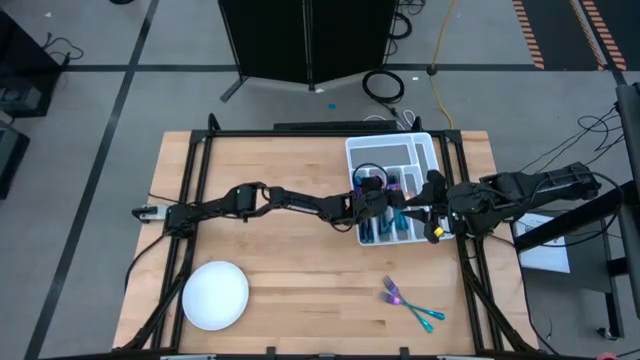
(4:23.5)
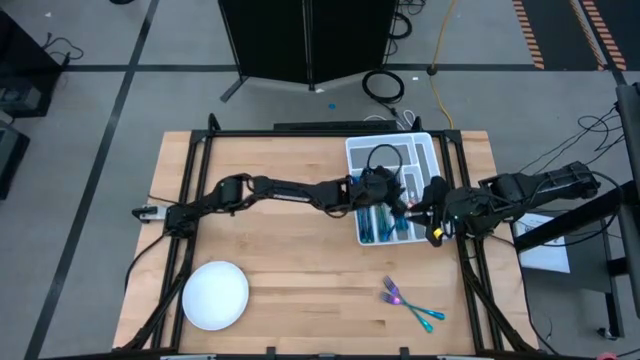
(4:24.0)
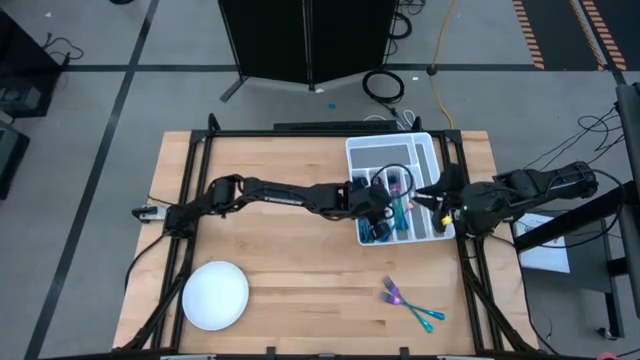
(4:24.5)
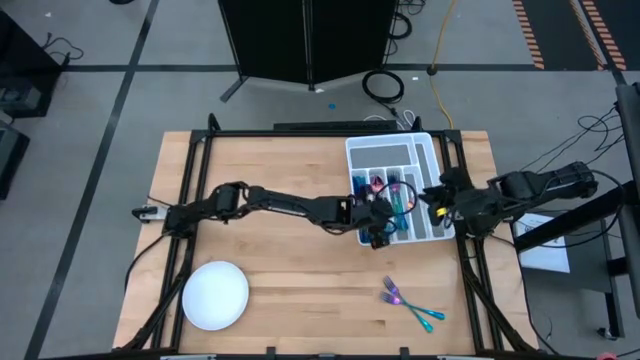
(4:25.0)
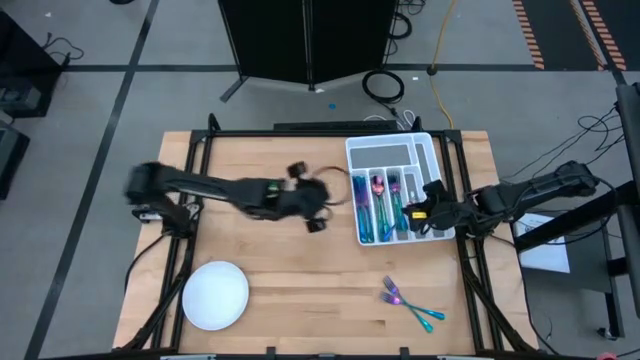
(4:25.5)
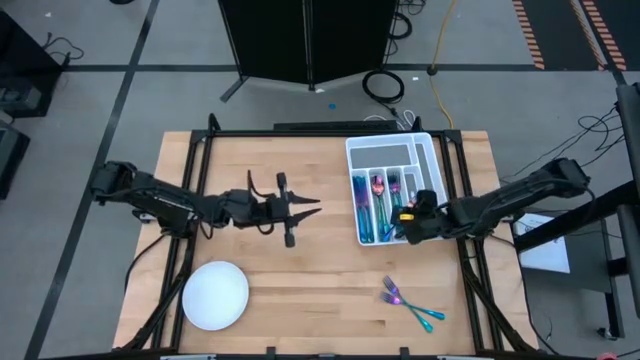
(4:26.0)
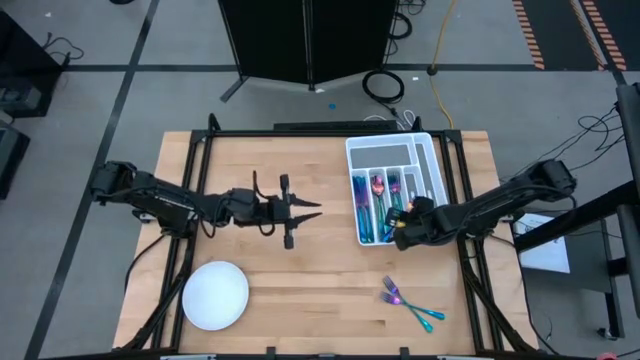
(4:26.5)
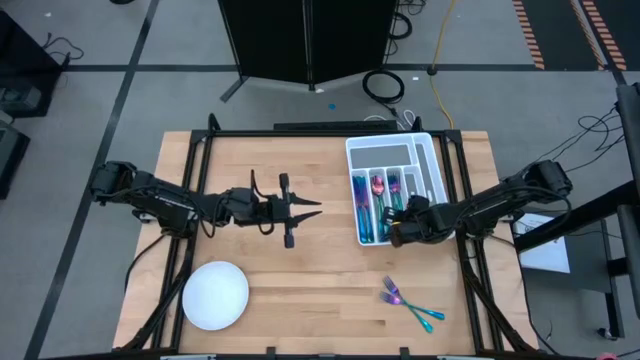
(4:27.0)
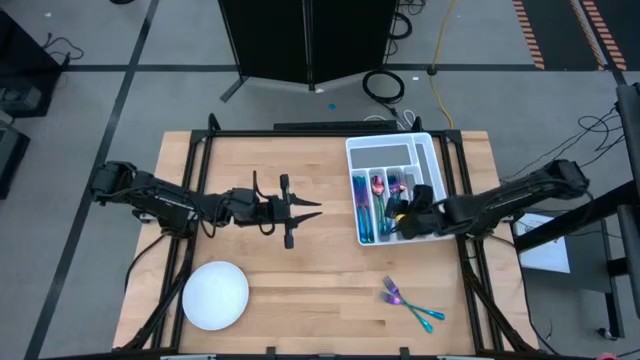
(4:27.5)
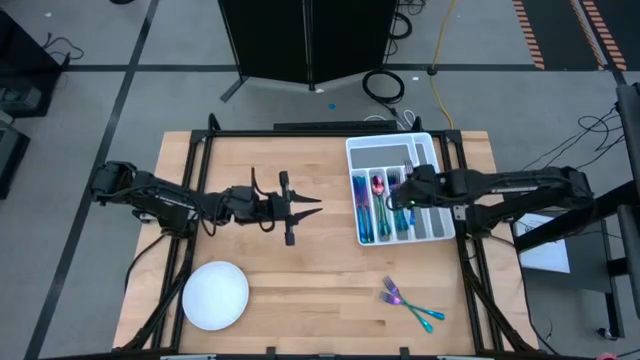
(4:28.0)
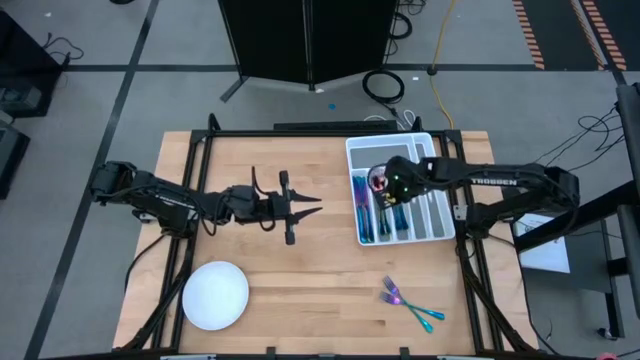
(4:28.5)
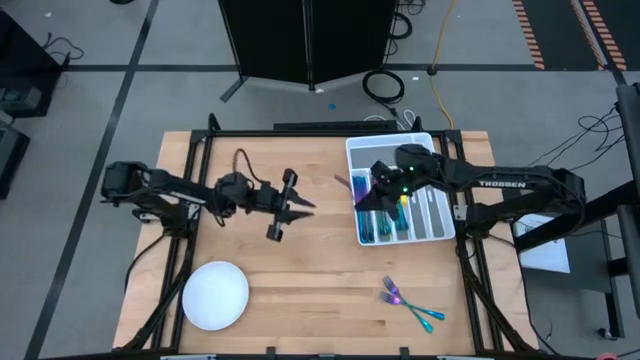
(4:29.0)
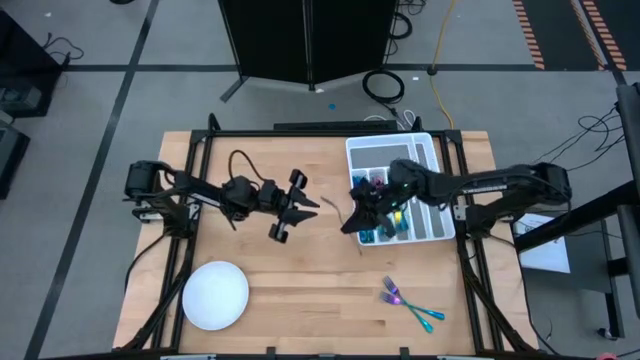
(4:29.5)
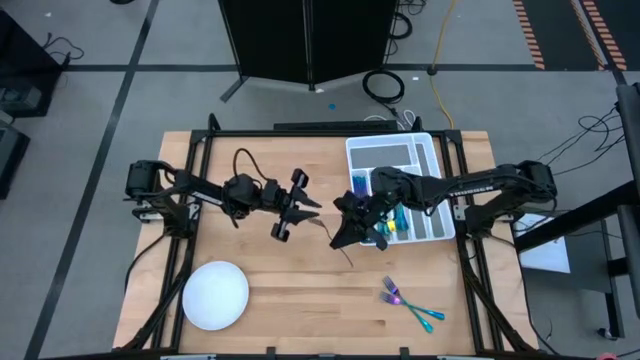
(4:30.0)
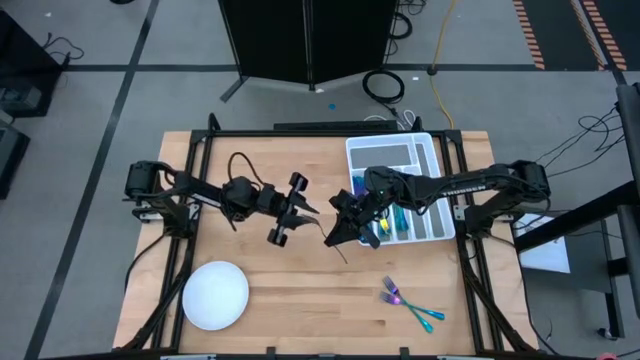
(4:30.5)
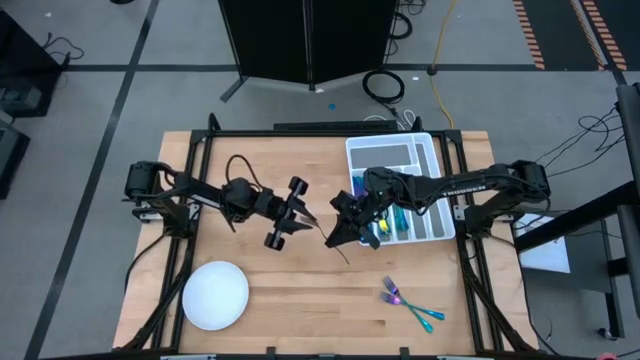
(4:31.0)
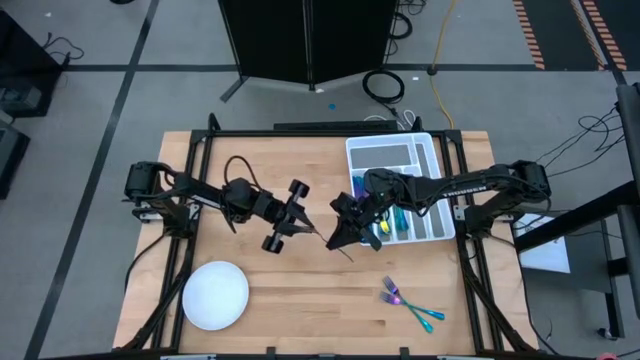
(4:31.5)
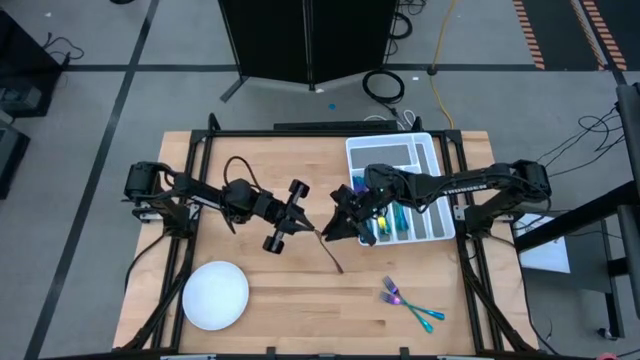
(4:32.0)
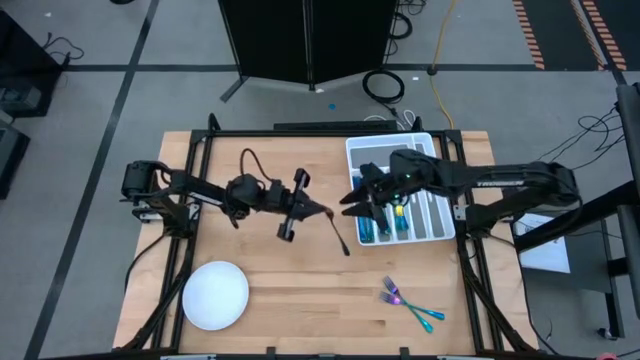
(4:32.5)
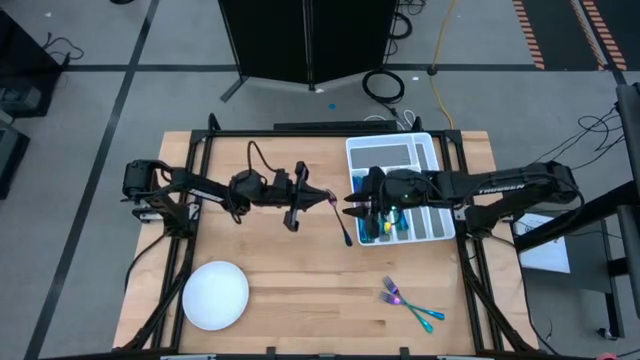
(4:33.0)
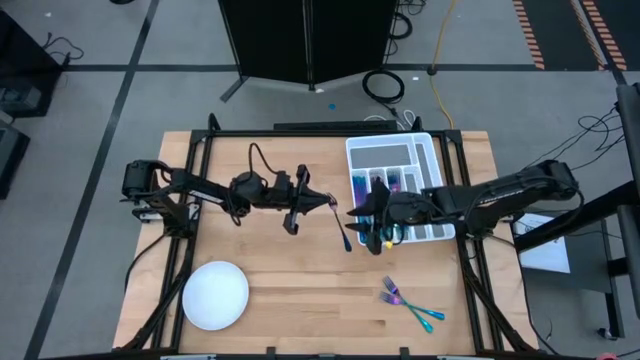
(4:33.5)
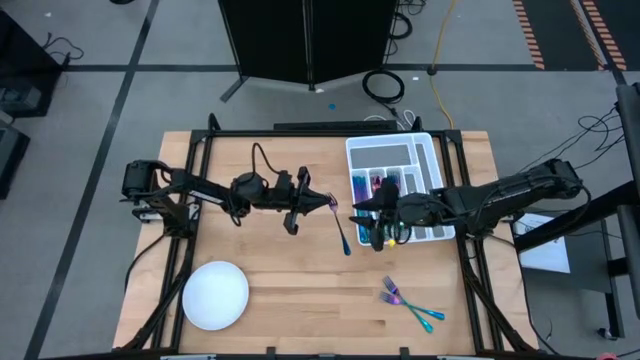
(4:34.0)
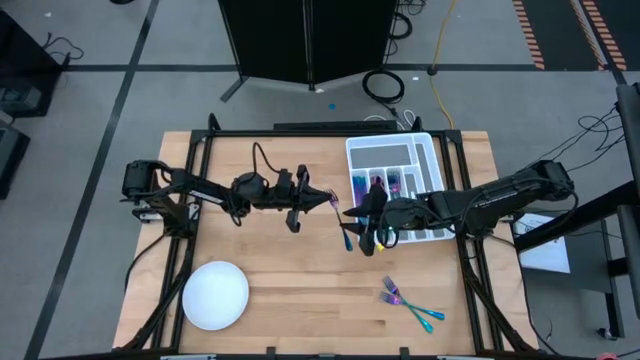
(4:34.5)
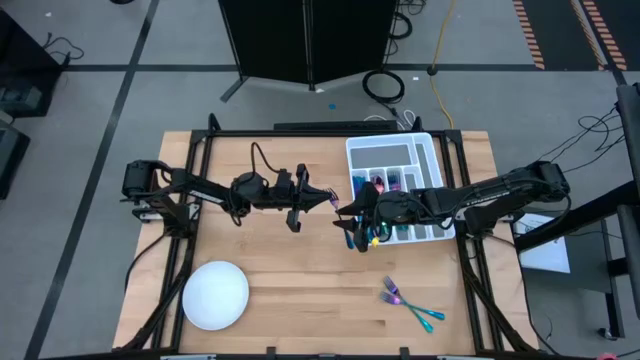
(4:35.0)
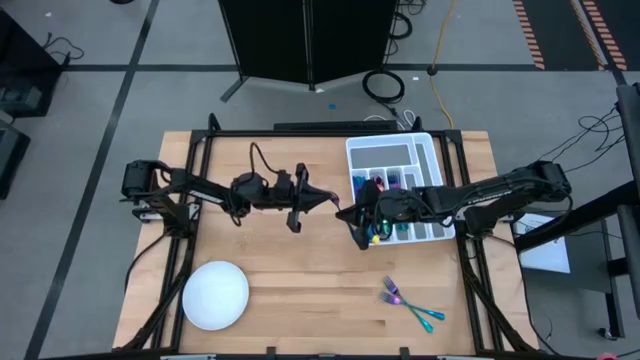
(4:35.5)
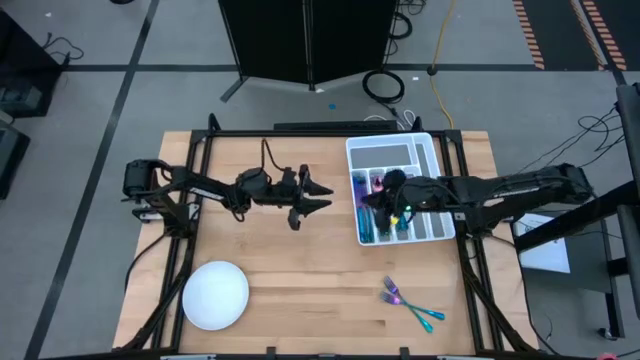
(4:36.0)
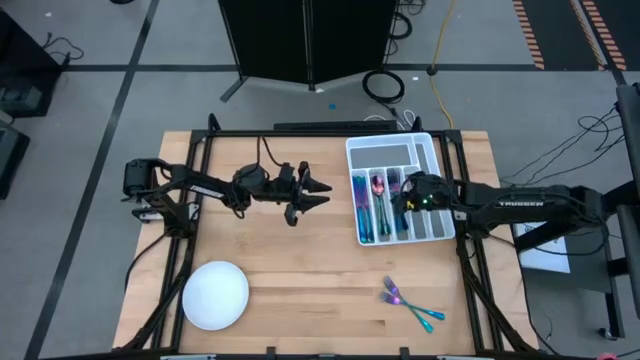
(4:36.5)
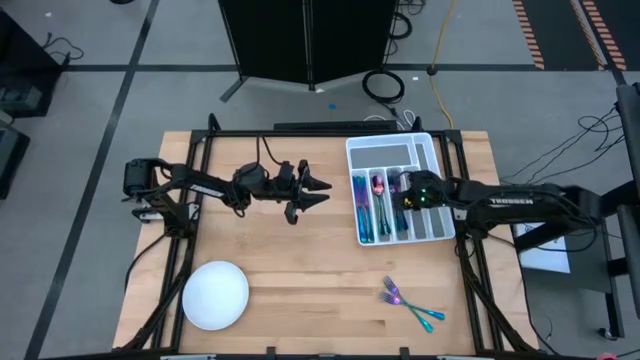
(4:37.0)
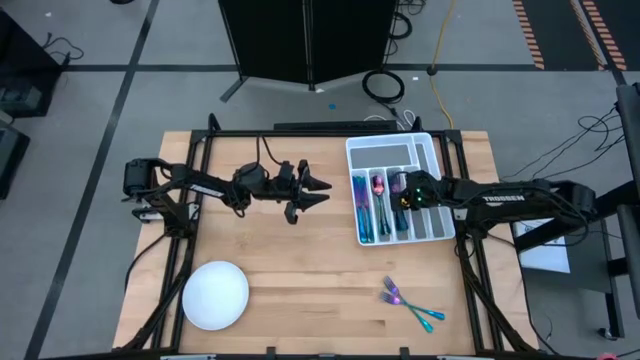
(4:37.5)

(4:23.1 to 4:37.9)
Task: Sort silverware
Put the blue fork into the utensil organizer

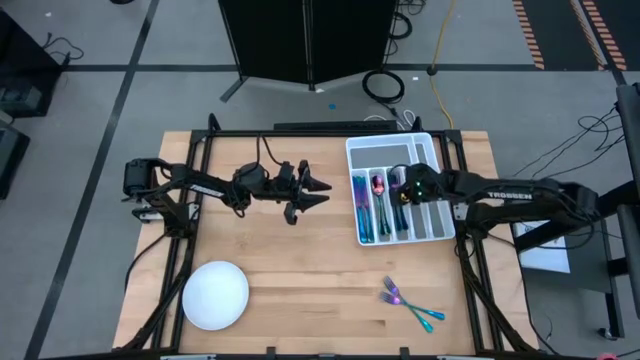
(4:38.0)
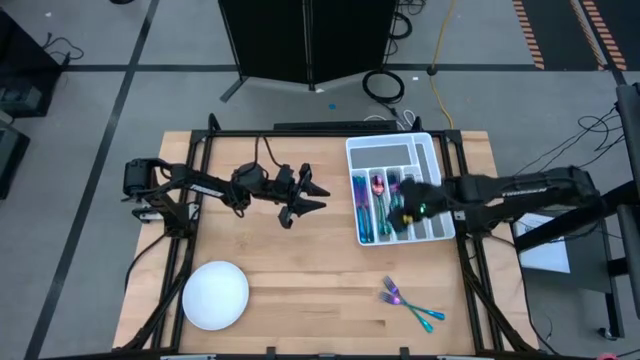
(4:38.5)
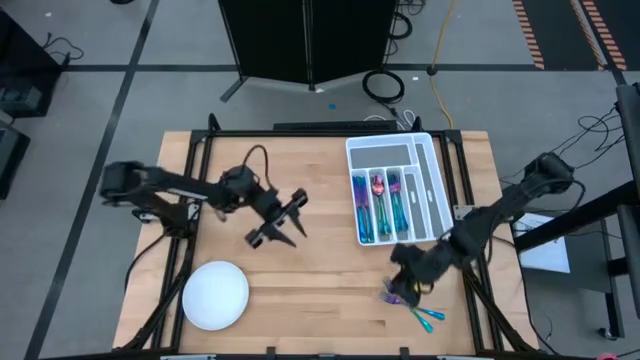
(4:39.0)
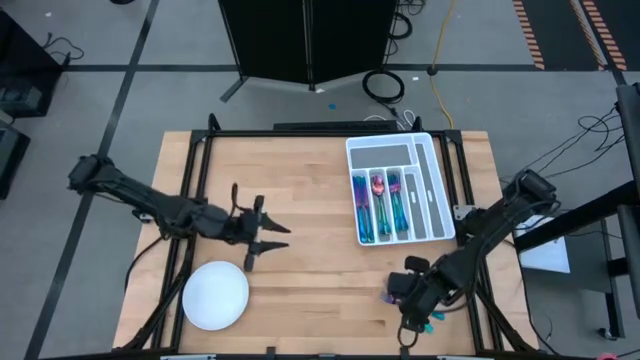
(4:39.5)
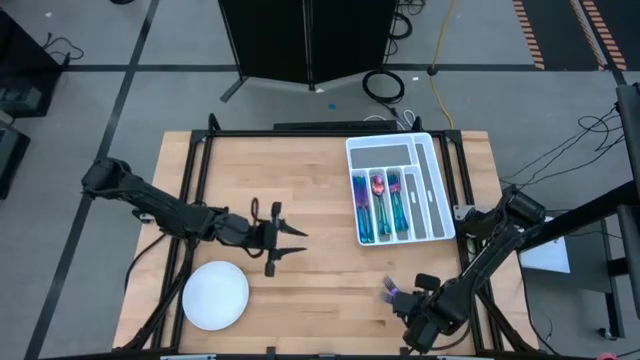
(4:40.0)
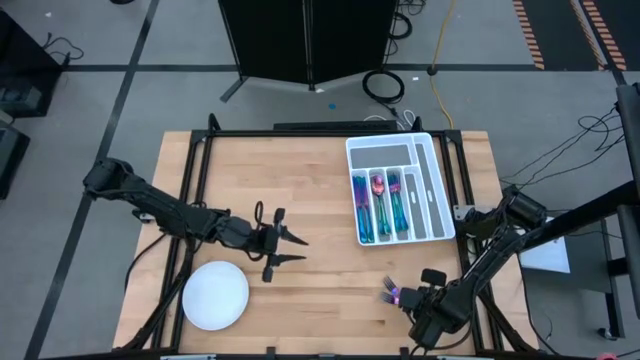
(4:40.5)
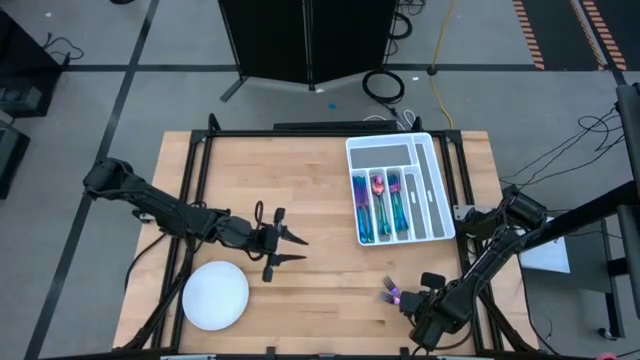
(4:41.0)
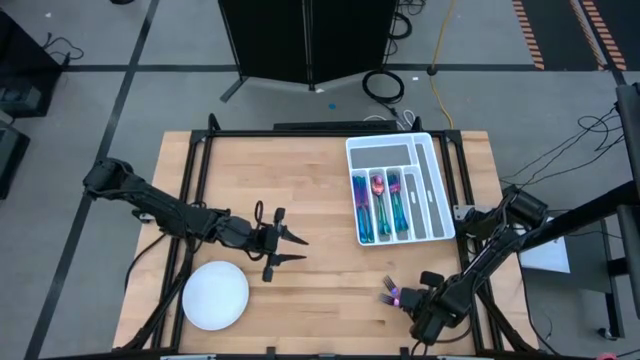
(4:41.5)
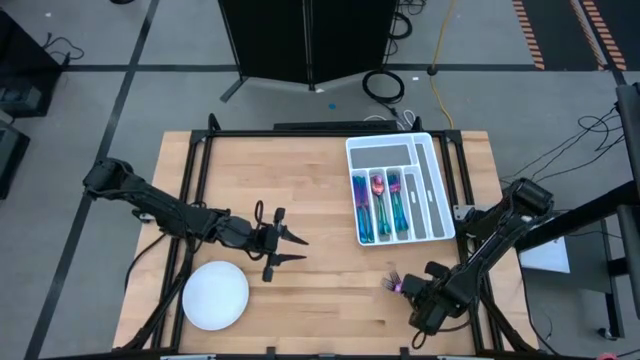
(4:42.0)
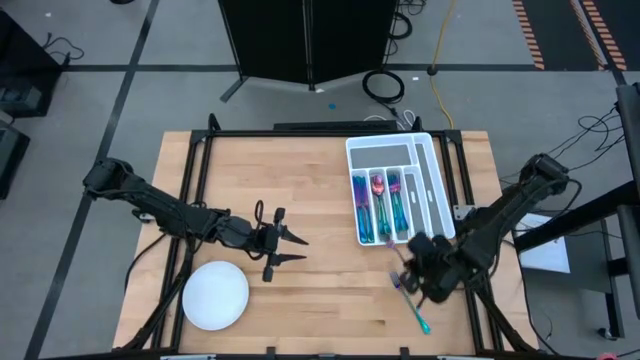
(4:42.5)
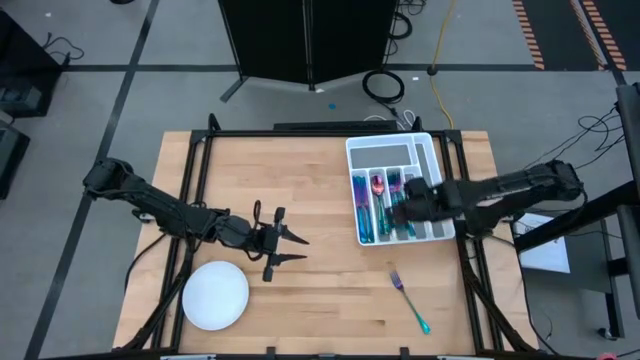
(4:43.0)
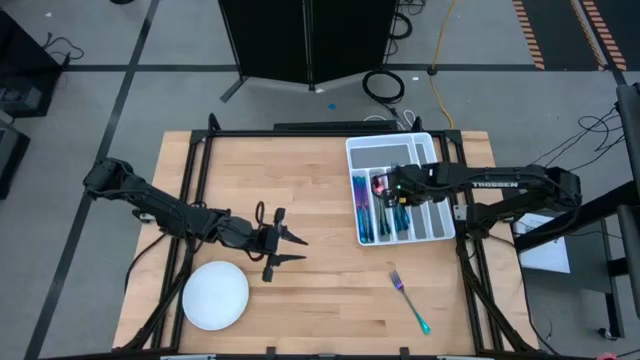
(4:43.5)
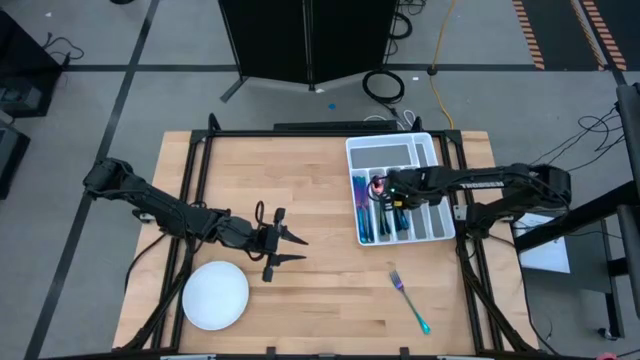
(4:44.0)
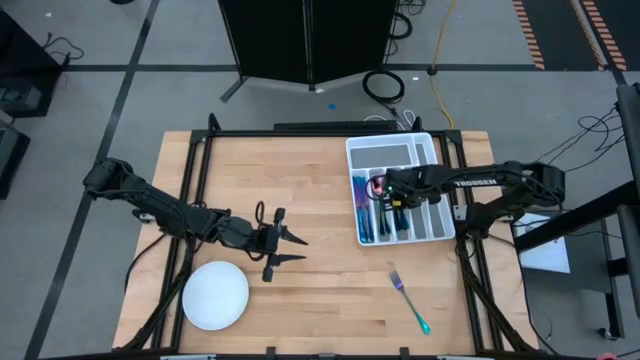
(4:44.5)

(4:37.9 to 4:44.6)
Put the blue fork into the utensil organizer

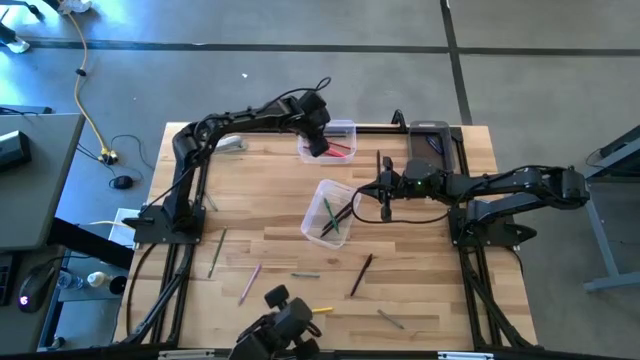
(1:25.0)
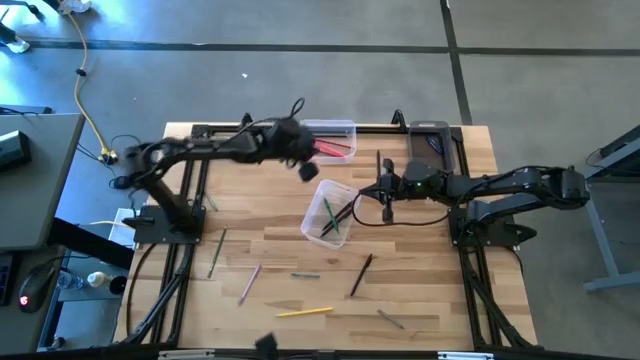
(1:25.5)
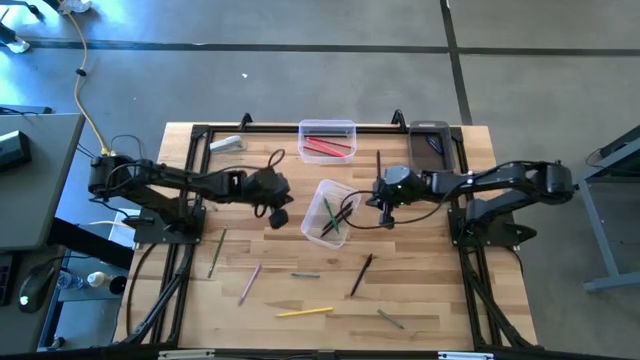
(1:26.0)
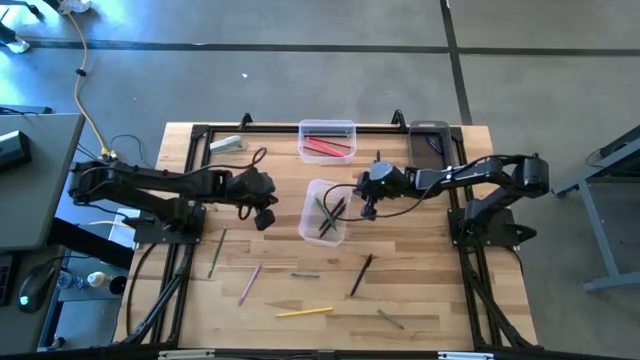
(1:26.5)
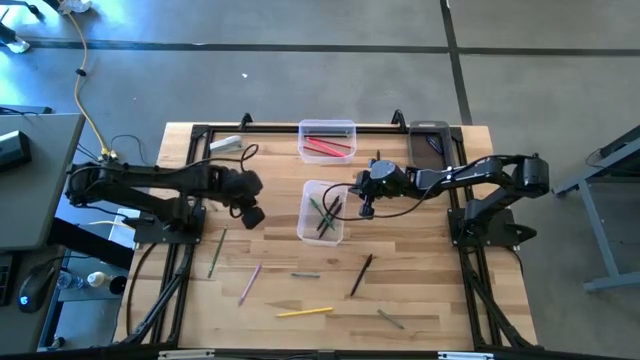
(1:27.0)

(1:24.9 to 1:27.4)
Task: Sort crayons/erasers/pens/pencils in bins
Adjust the bottom transparent bin
